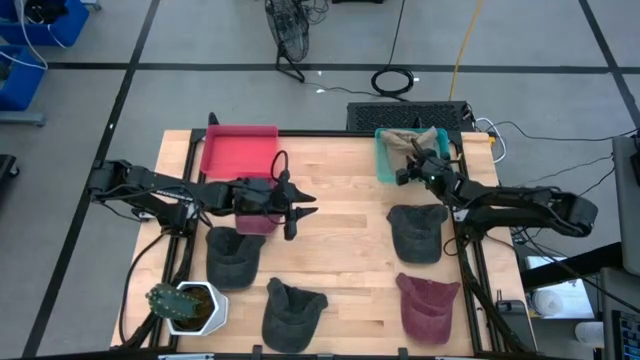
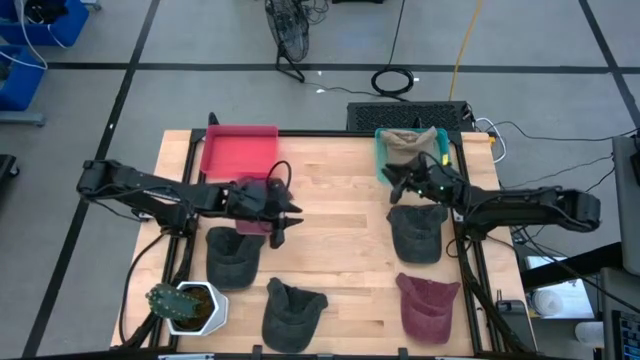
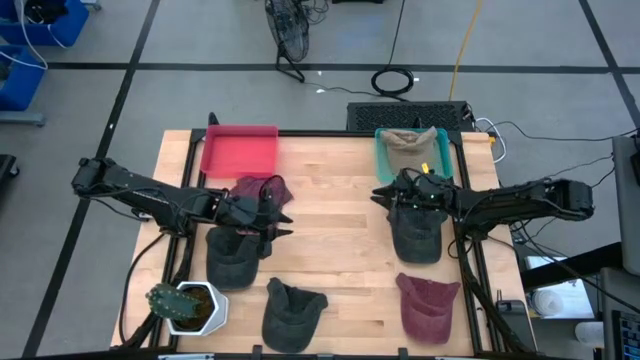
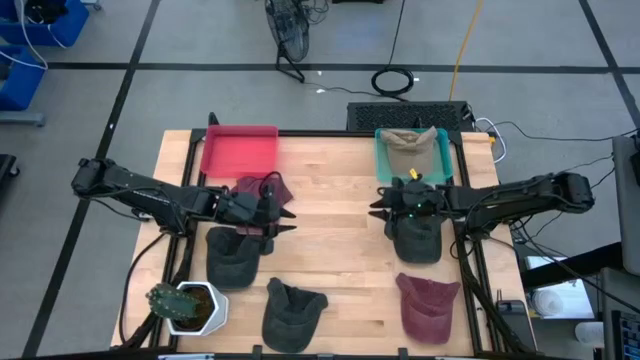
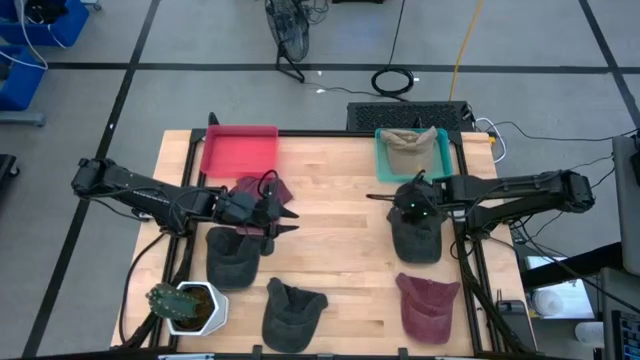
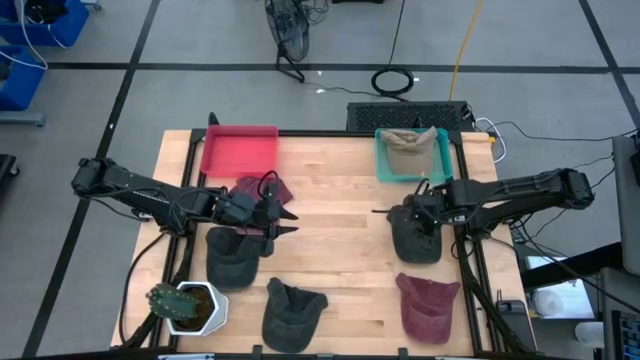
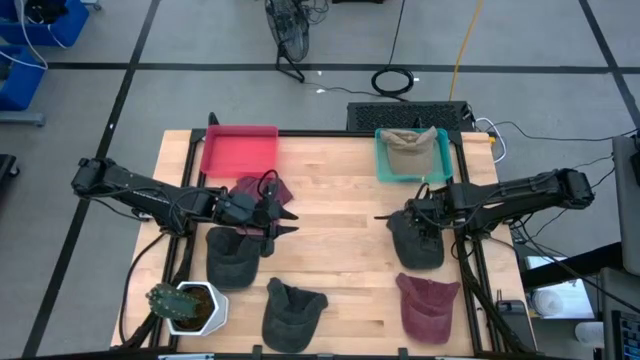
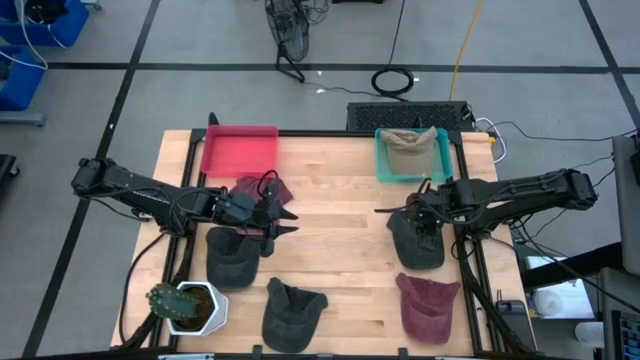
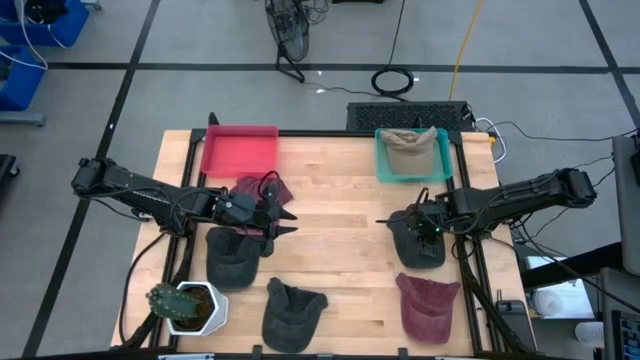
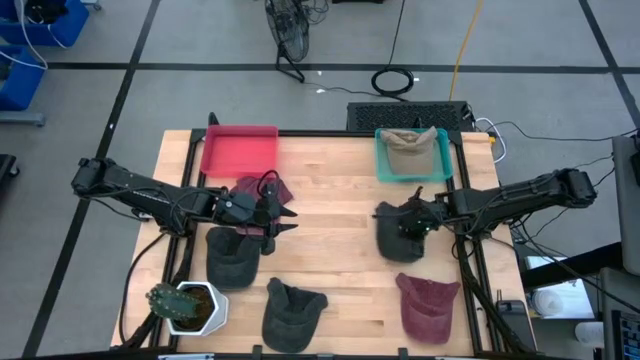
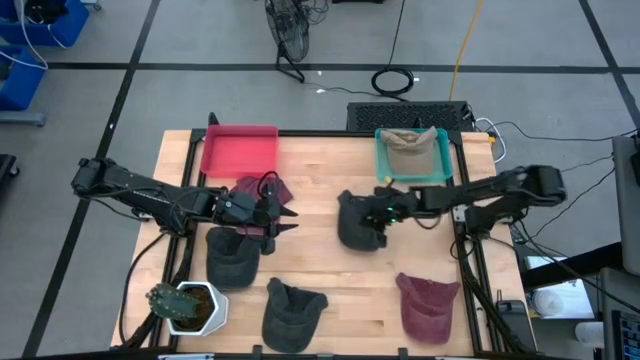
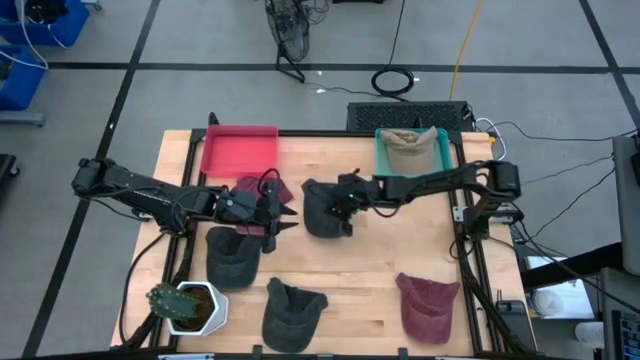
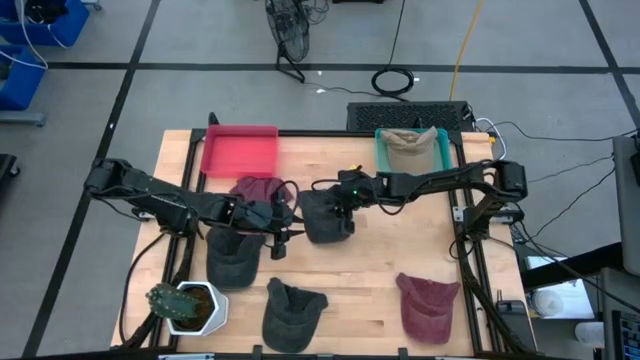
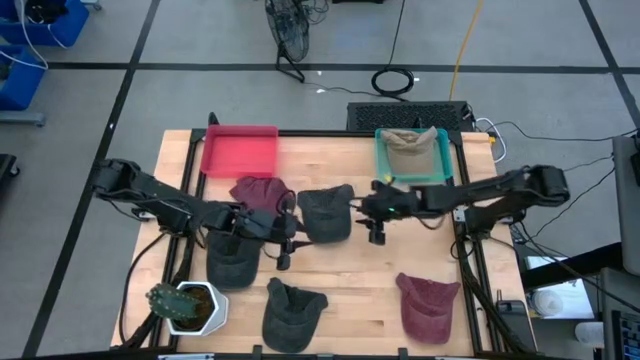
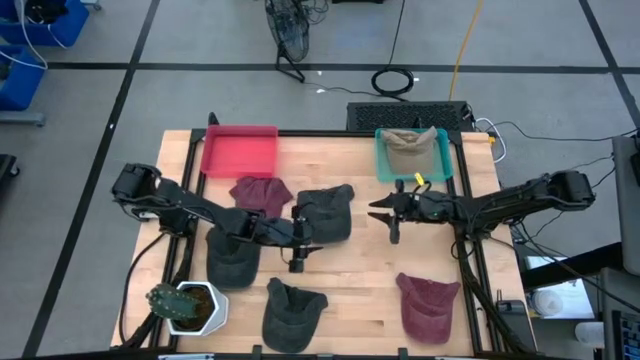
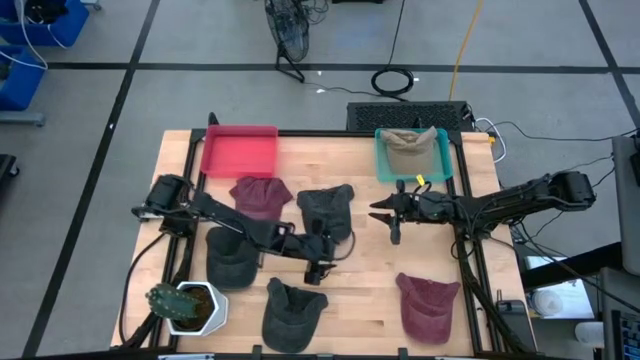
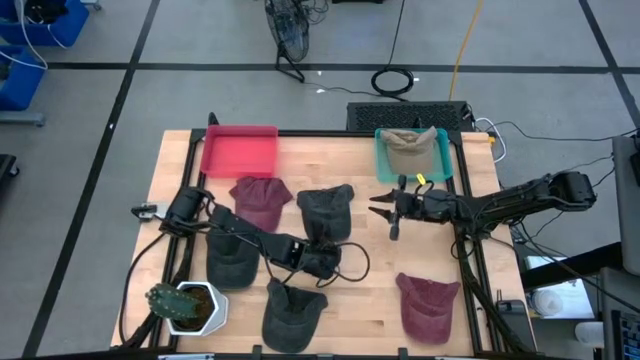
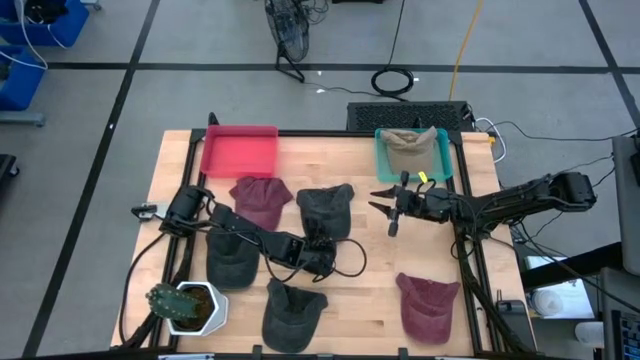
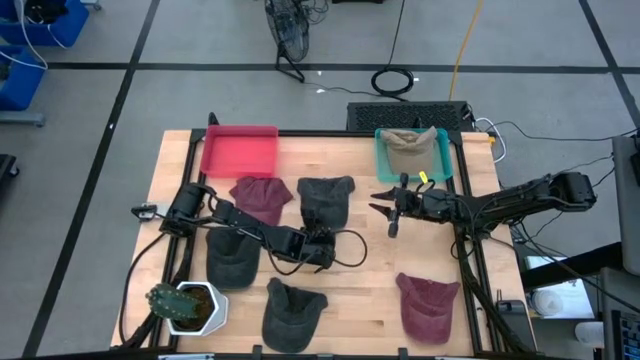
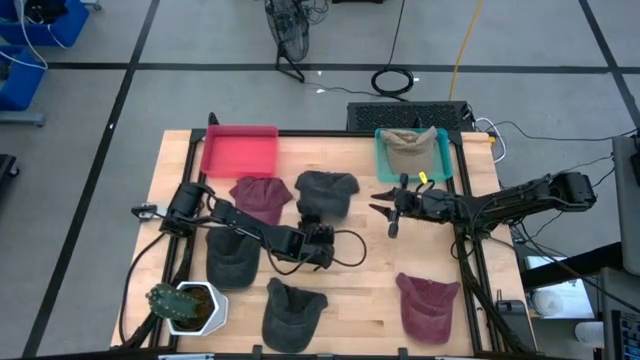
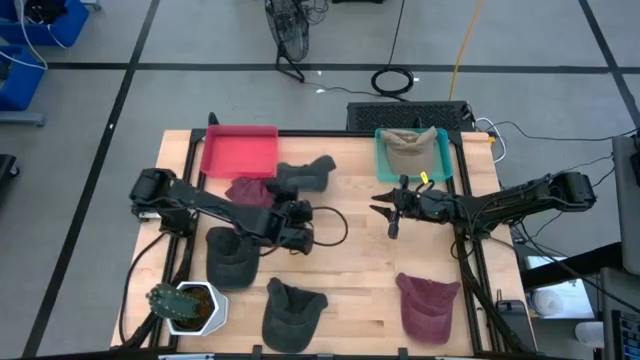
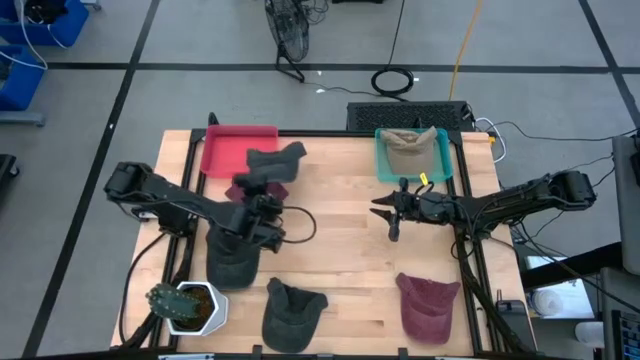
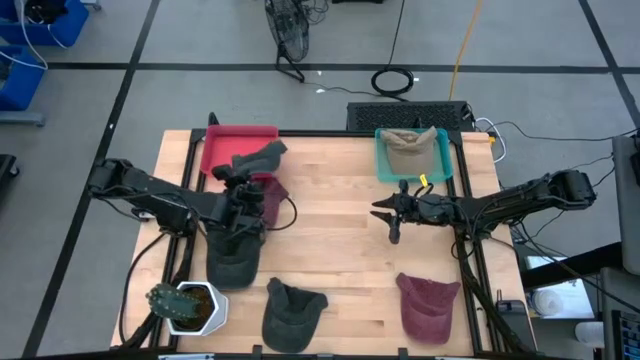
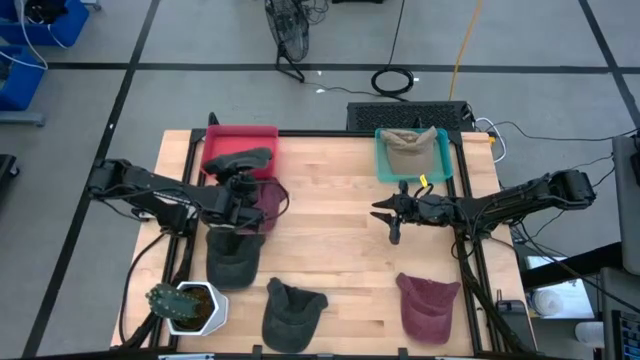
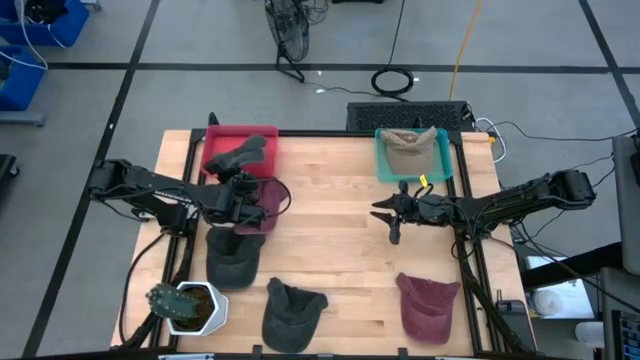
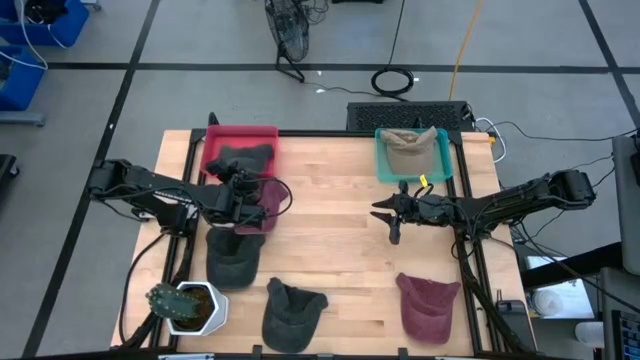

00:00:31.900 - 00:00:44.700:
Task: Pick & Place hat
Put the top right black cap into the red bin

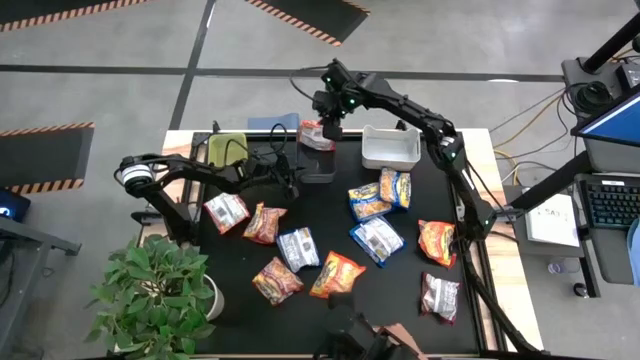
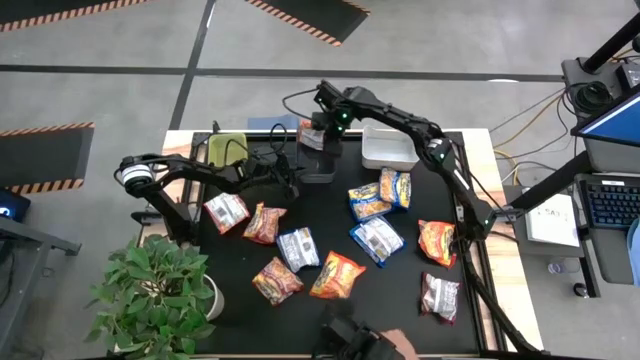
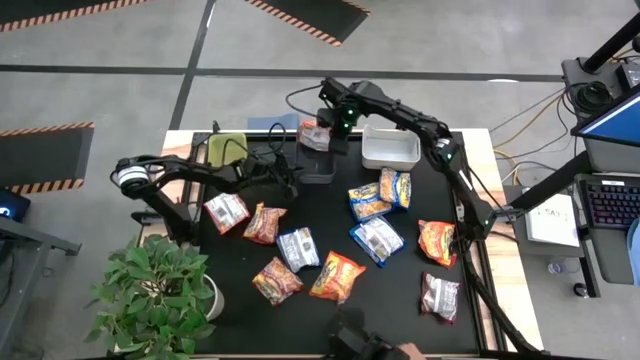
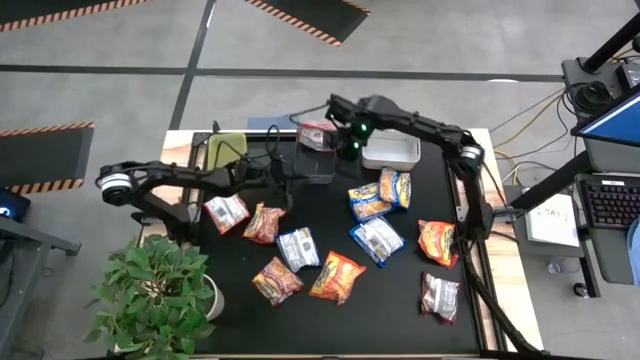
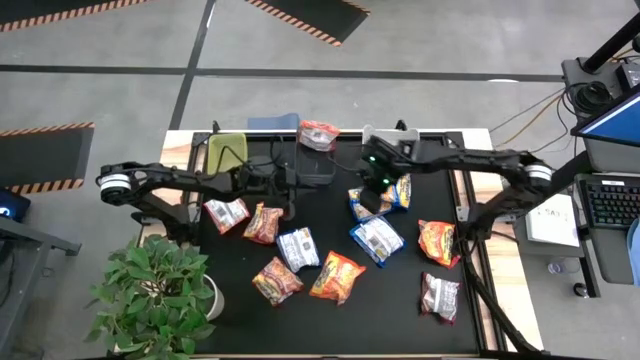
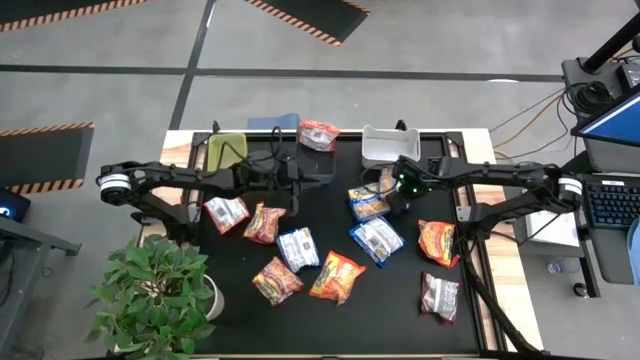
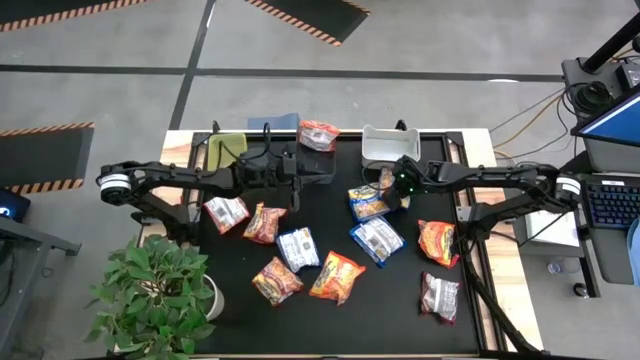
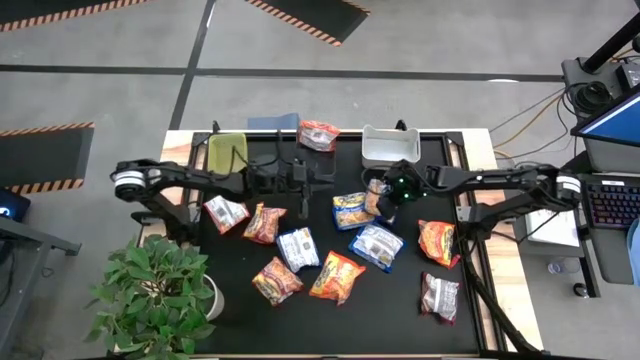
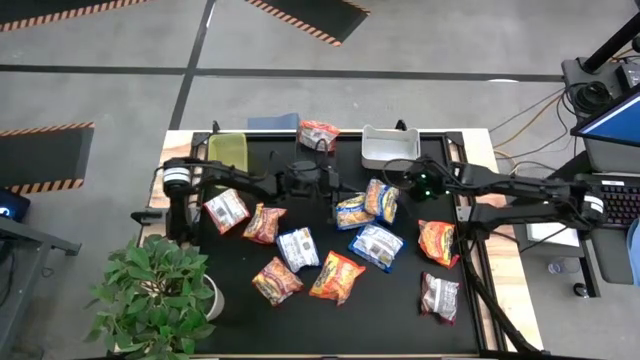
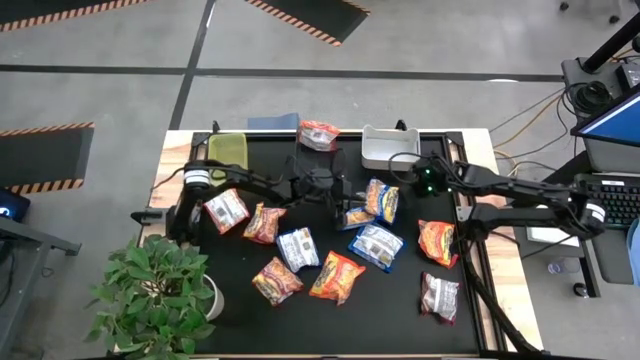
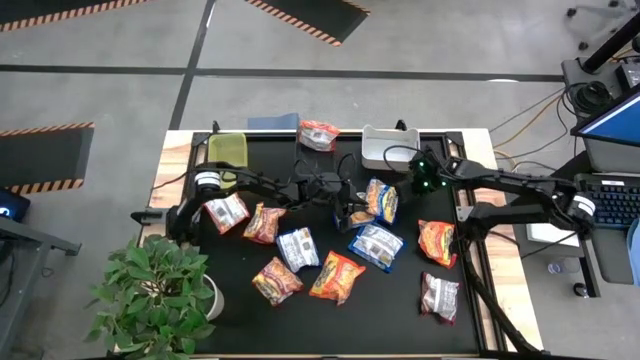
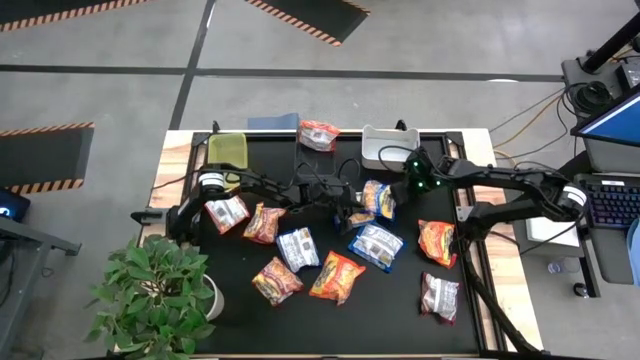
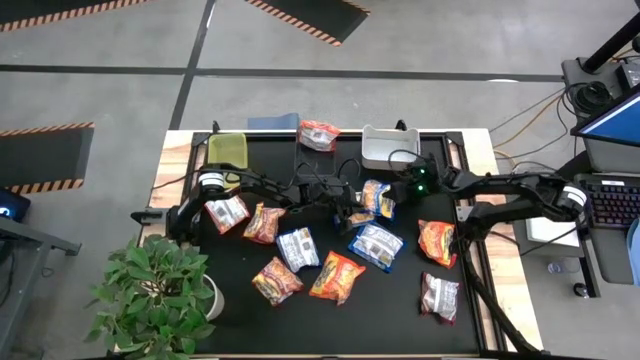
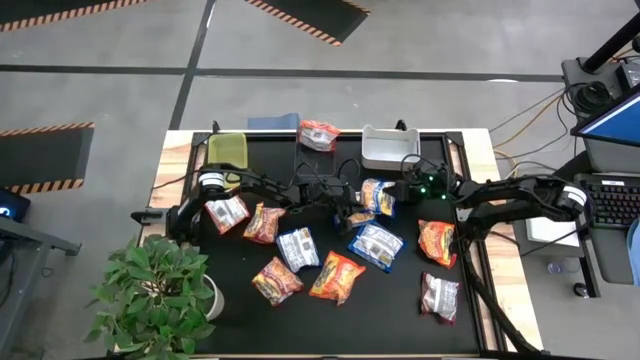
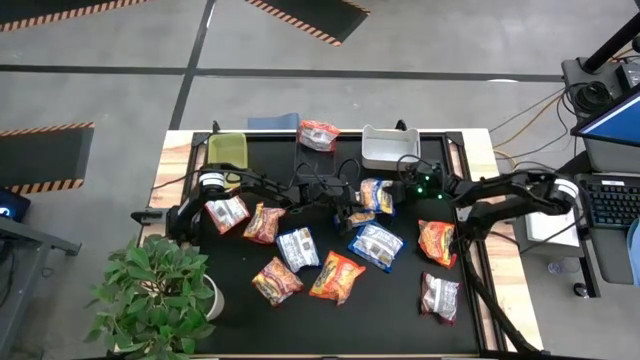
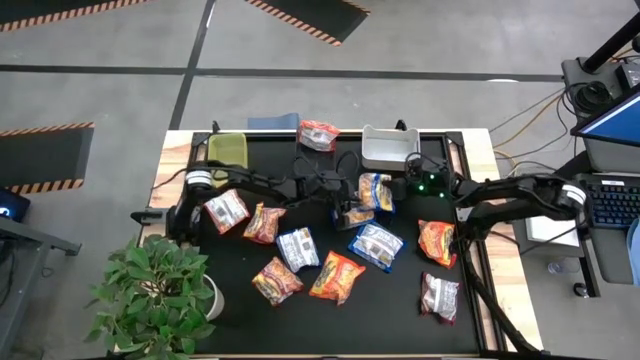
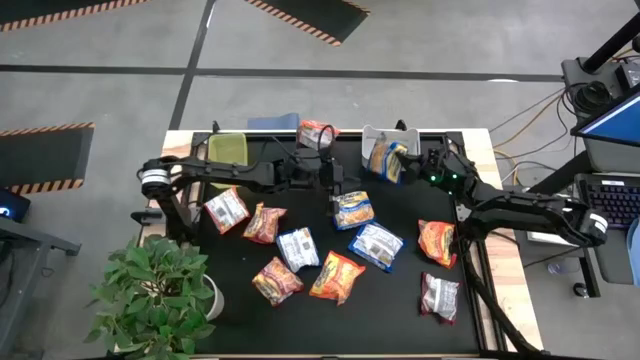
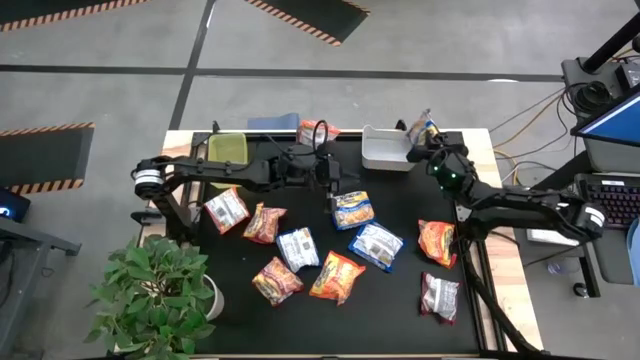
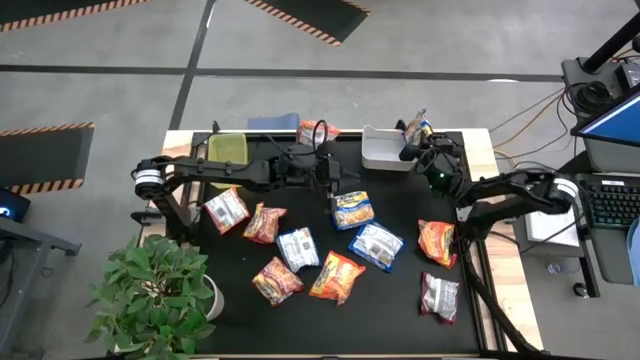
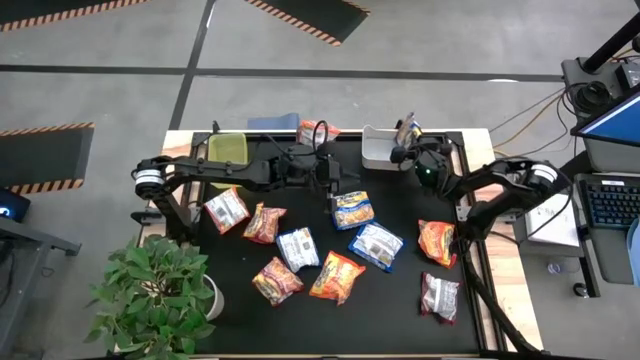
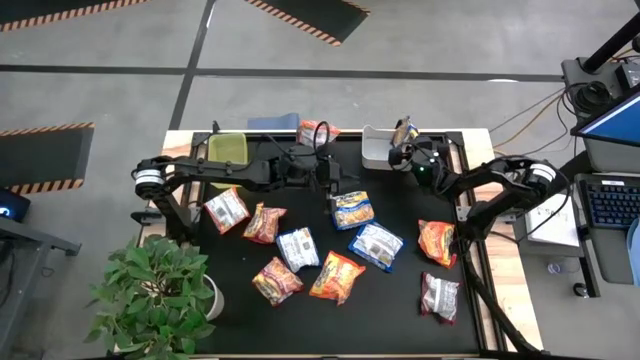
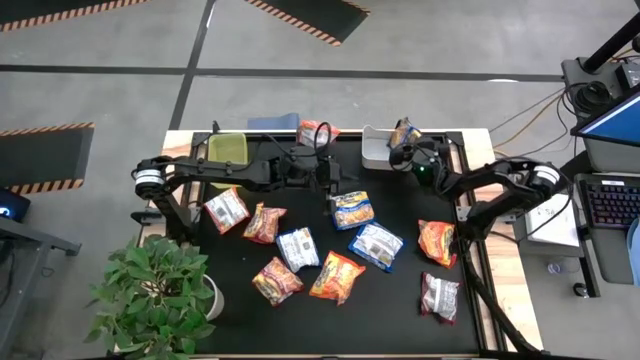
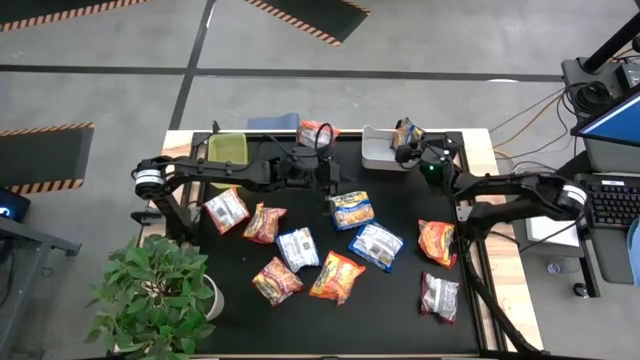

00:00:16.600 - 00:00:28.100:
Task: Sort Maruchan noodles
Put the blue noodle pack into the white bin
